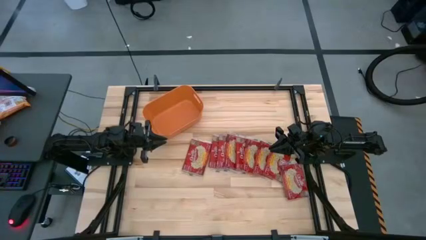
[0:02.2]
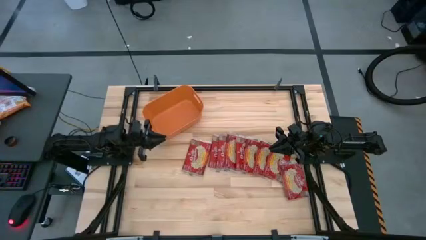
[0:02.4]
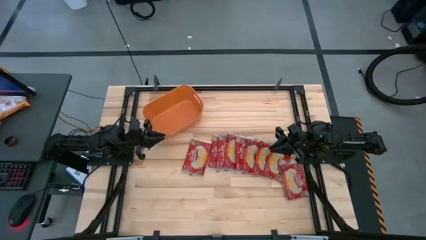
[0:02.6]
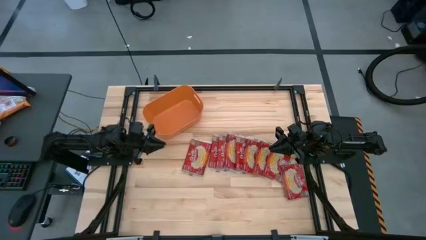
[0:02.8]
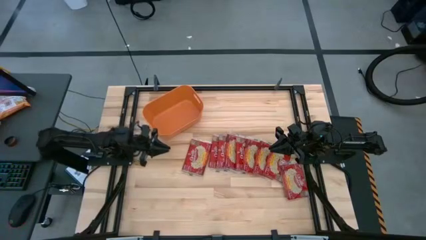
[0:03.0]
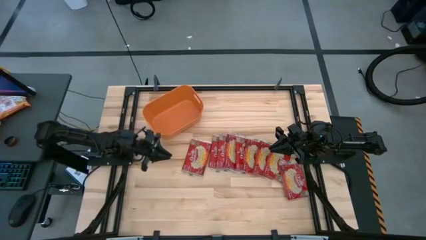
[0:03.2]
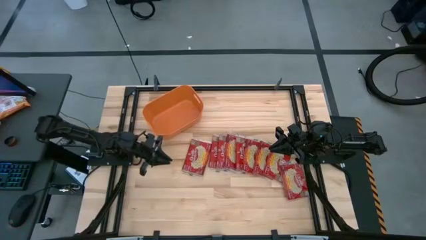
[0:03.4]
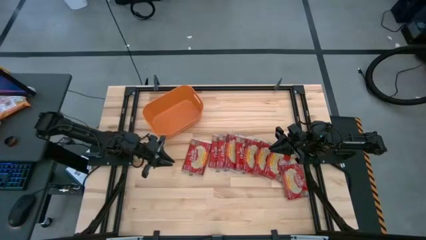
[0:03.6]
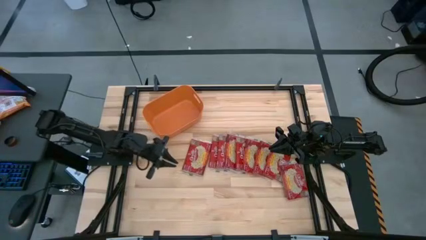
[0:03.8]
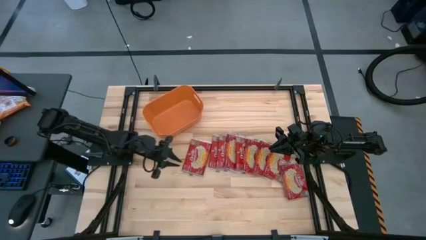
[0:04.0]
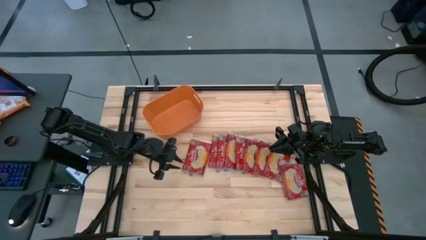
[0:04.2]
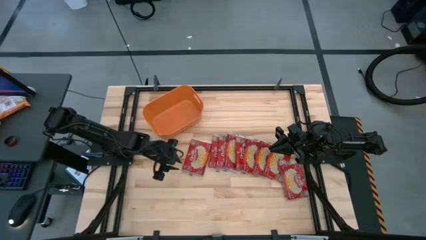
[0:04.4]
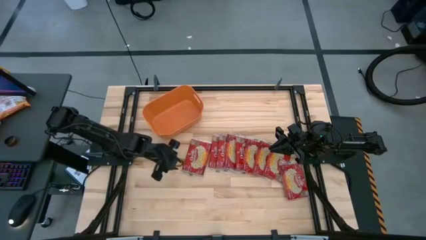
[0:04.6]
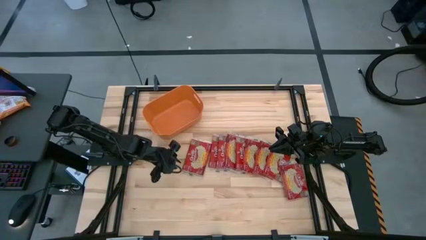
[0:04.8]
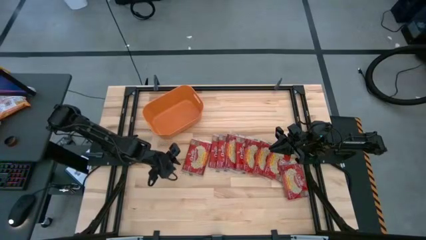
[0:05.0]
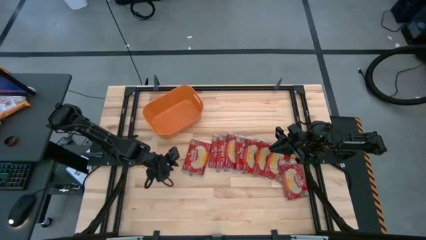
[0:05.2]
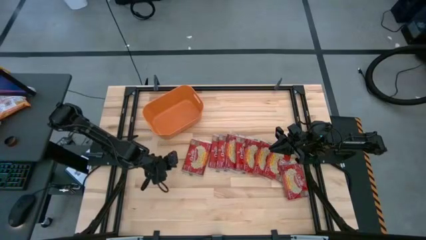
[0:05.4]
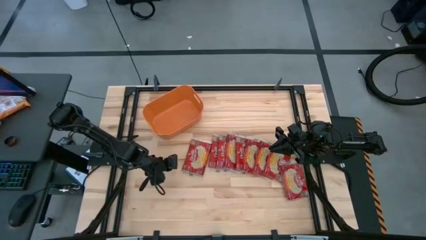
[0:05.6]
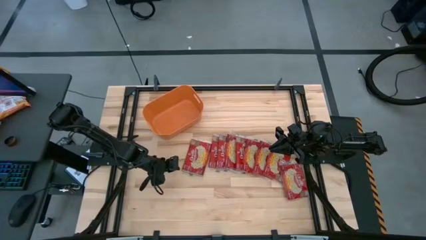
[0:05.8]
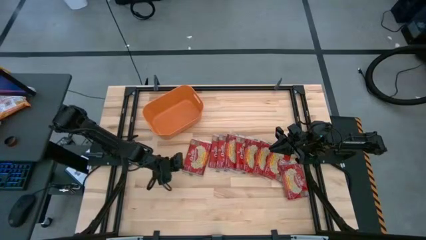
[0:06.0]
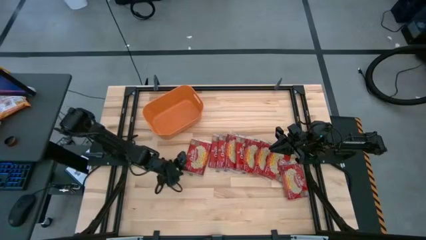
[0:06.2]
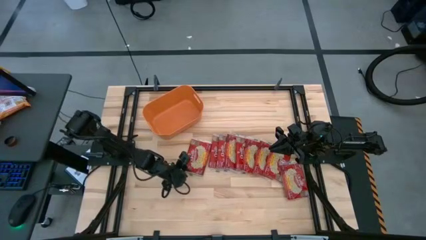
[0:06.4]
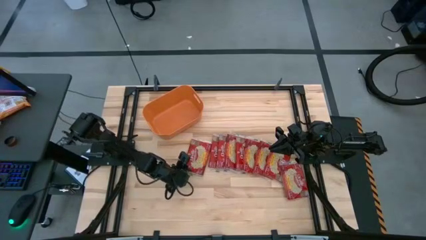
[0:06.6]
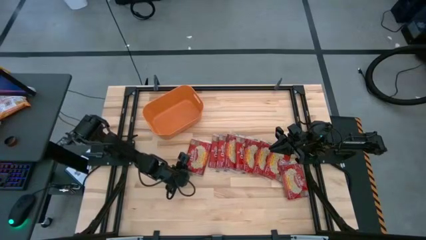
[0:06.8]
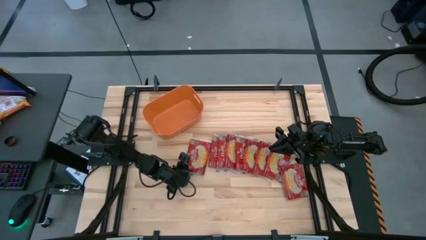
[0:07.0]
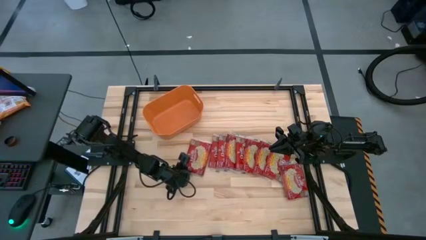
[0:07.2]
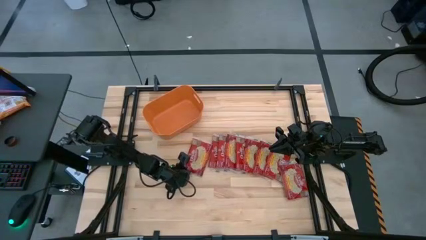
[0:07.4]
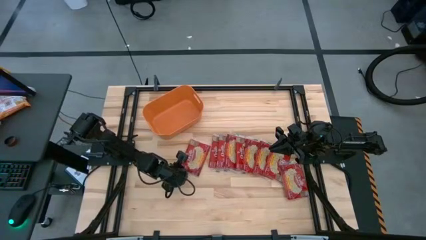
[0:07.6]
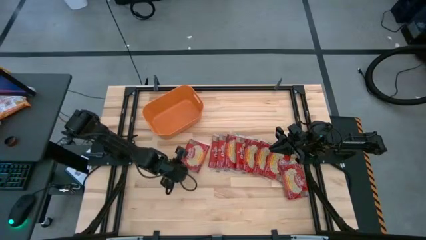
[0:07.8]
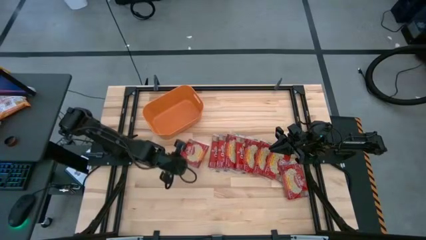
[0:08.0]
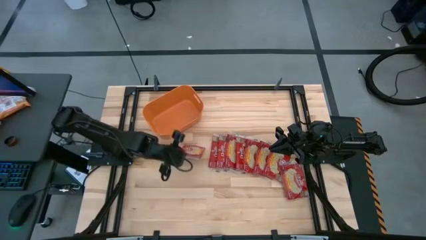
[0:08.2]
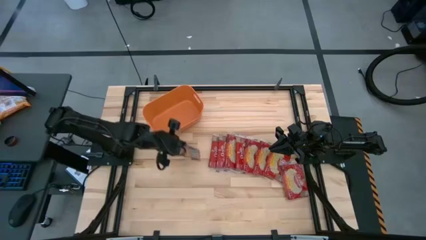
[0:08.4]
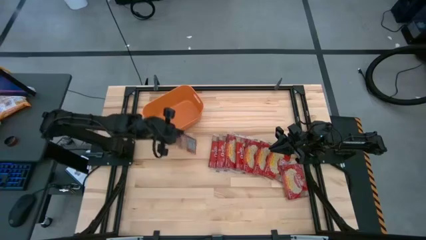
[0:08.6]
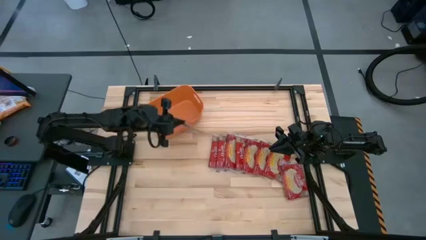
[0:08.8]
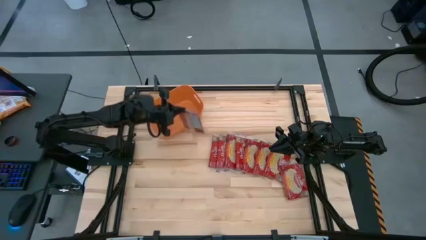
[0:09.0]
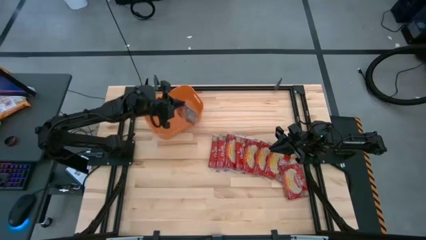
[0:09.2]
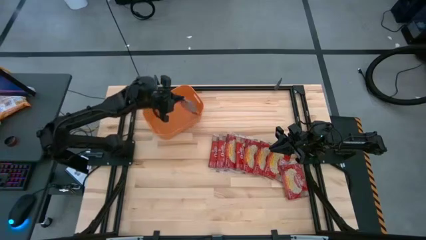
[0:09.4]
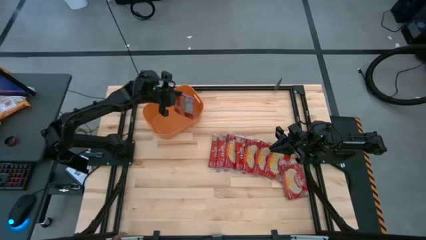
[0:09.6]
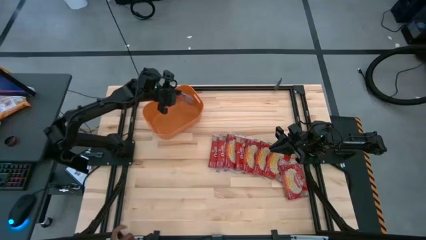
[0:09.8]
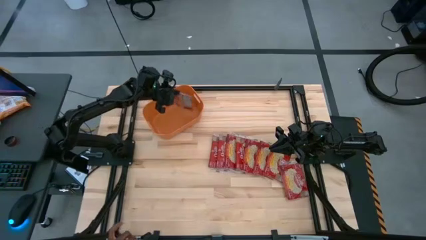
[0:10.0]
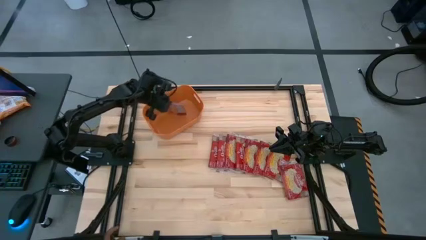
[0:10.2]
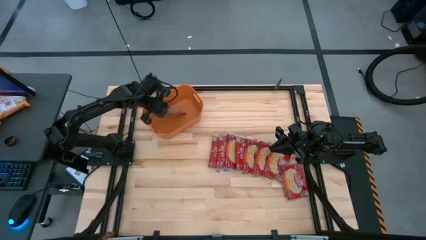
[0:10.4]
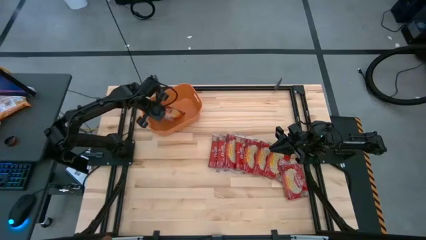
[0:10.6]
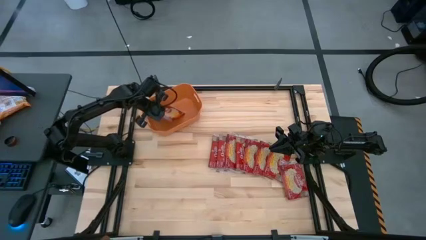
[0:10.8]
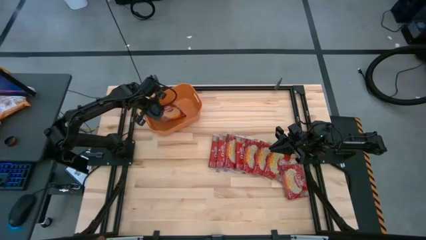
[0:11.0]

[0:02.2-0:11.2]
Task: Sort popcorn bags into baskets
Put the red popcorn pack into the orange bin

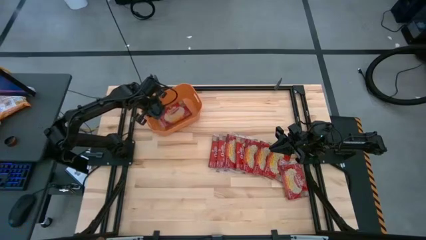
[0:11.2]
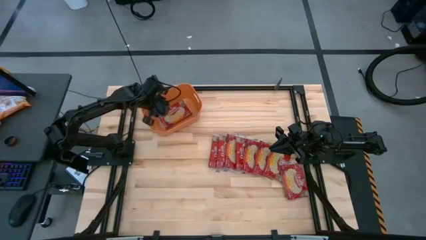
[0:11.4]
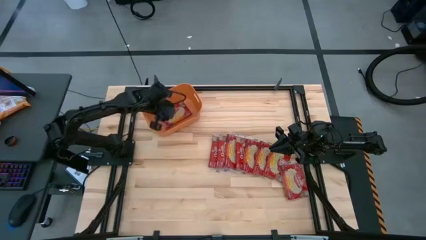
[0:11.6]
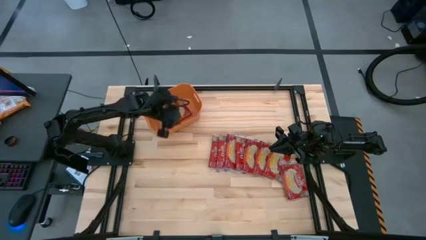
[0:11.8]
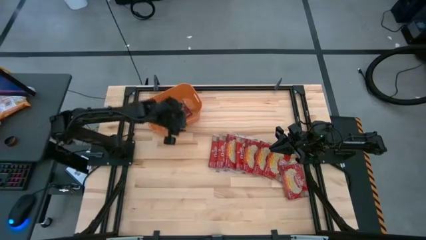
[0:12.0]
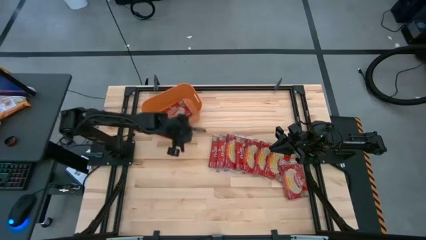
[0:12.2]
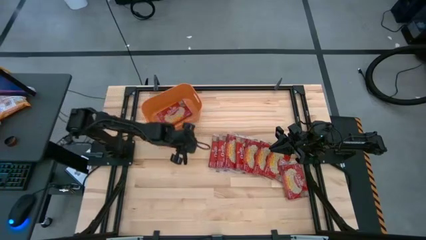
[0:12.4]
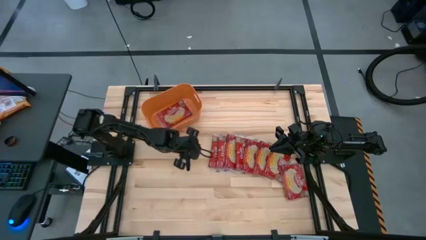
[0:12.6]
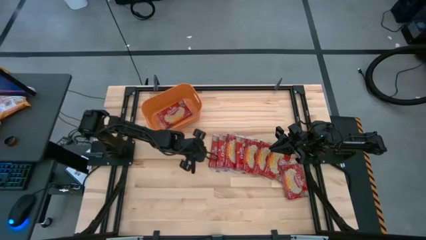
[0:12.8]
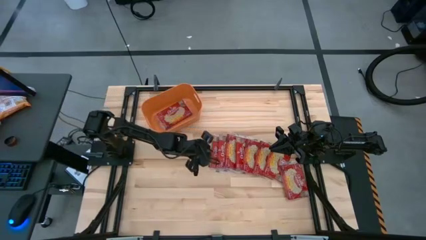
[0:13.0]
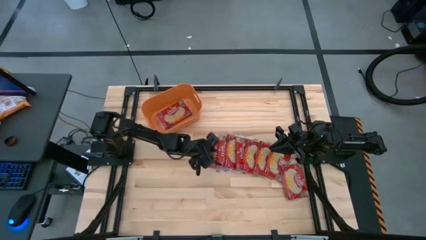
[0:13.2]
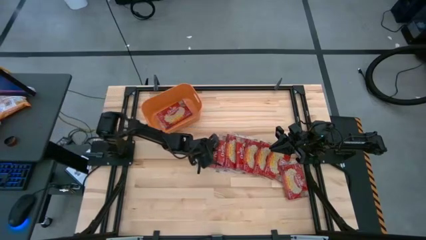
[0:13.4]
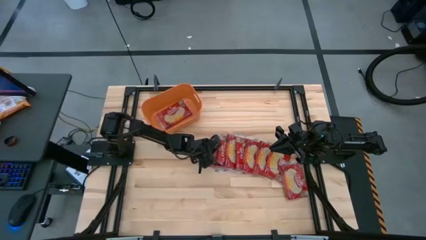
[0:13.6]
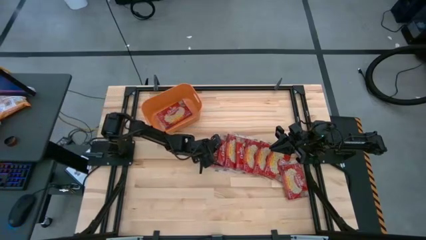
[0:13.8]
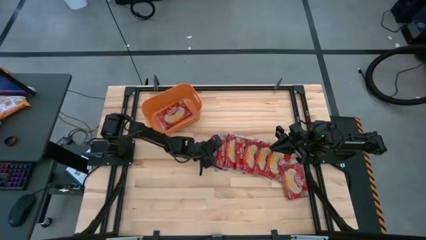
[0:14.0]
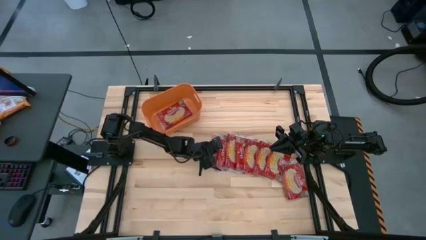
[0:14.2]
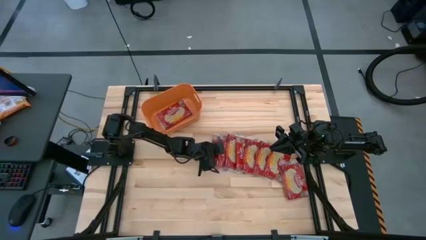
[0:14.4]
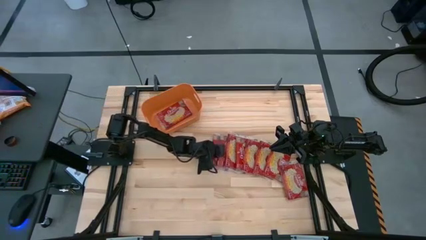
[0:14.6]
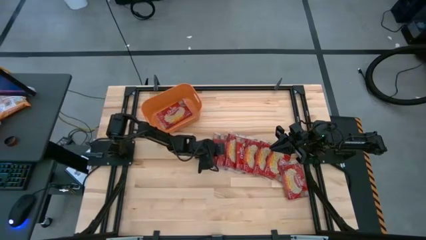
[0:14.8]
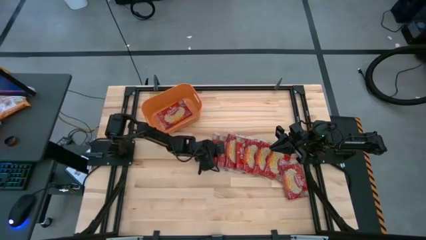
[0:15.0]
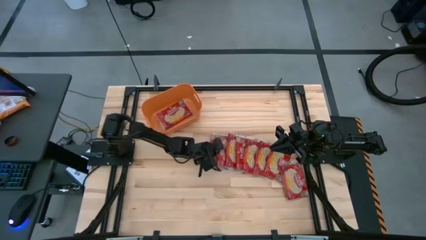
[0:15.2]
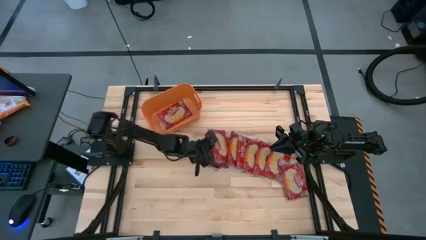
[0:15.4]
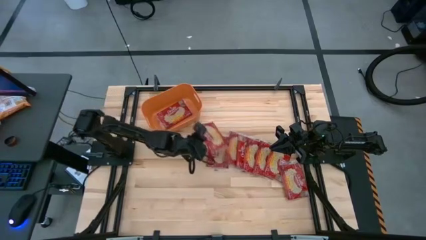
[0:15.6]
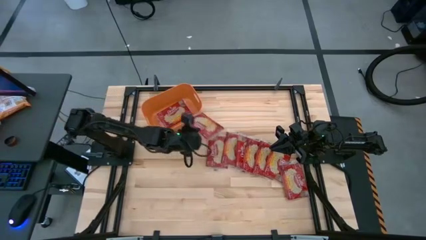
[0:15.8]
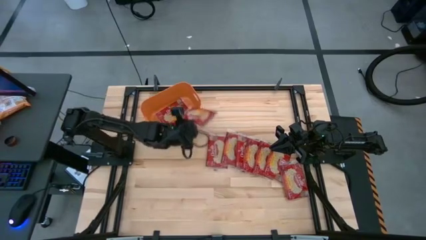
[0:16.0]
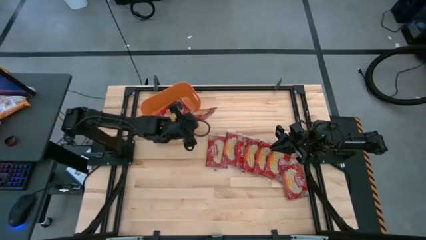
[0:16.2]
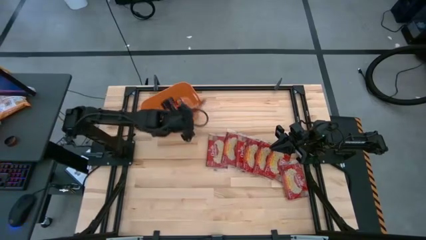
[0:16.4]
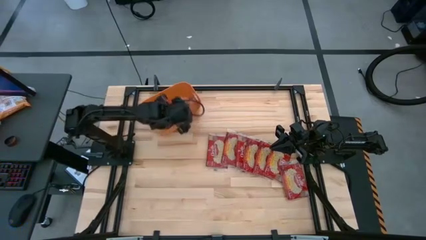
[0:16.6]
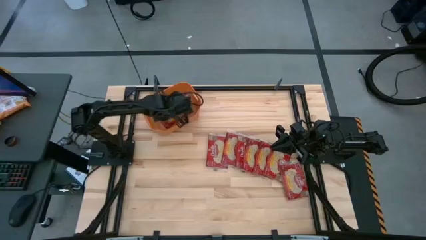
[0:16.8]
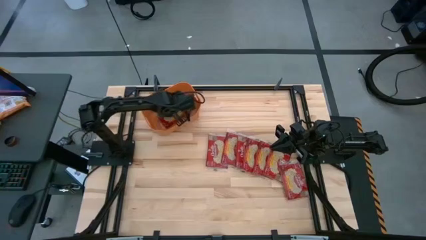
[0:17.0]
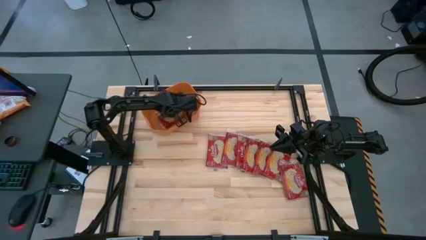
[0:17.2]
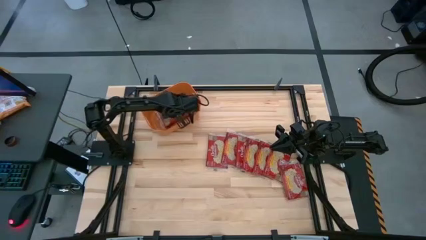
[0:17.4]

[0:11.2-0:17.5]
Put the red popcorn pack into the orange bin

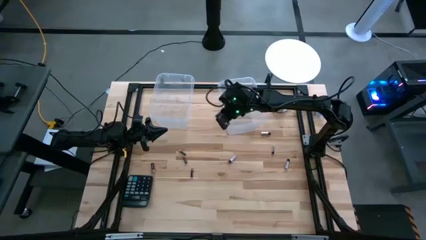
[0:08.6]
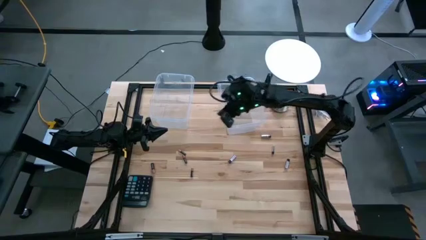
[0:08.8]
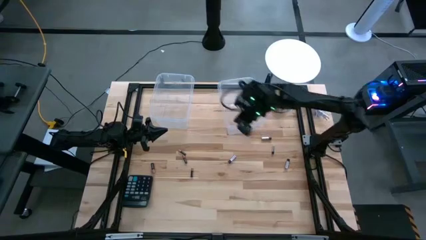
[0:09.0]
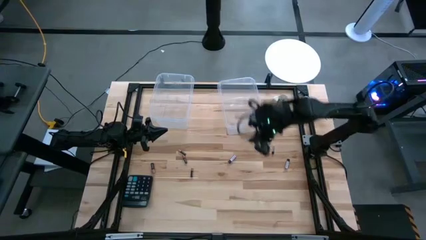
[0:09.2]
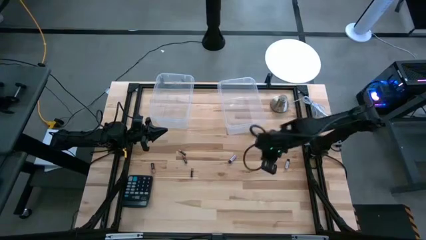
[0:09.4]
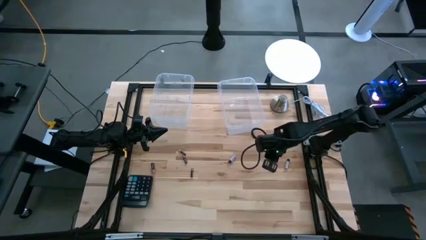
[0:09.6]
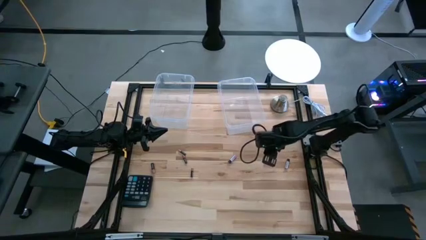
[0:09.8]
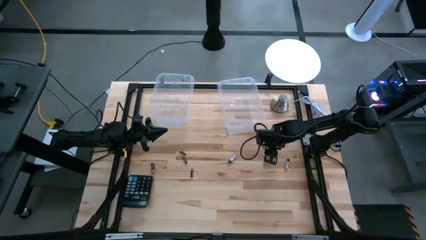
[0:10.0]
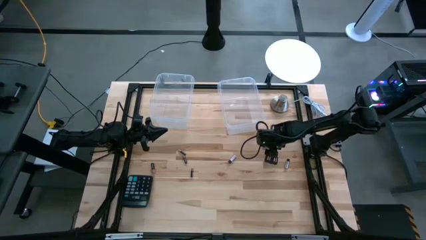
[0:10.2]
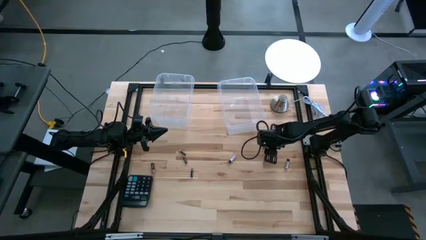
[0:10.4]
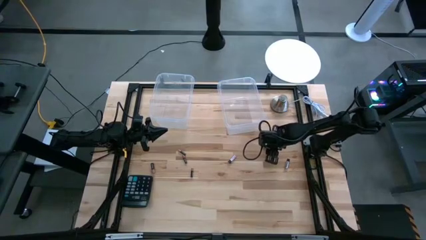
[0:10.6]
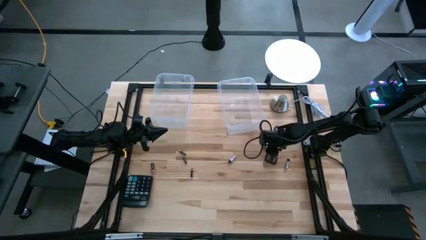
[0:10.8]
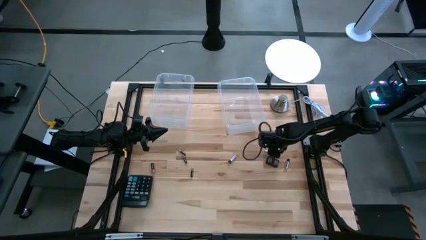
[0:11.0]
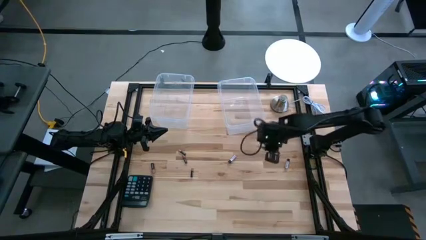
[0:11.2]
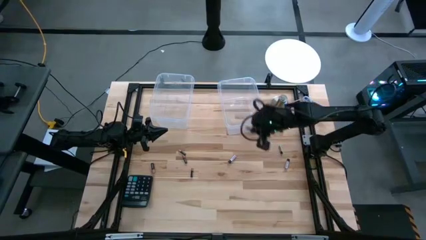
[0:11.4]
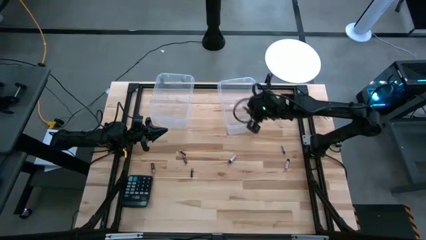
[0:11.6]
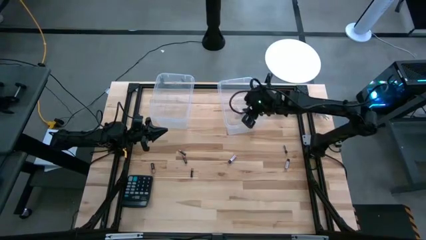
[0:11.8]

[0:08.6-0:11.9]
Task: Sort batteries
Put the silver battery into the right transparent bin
